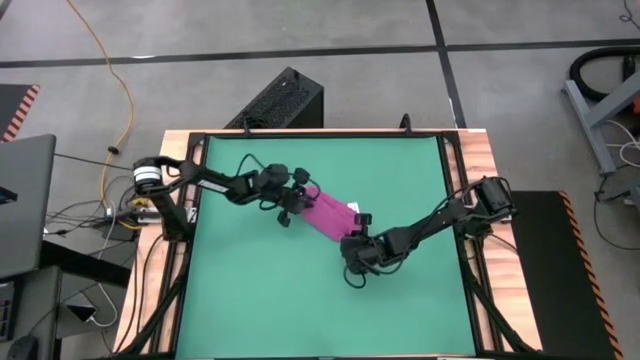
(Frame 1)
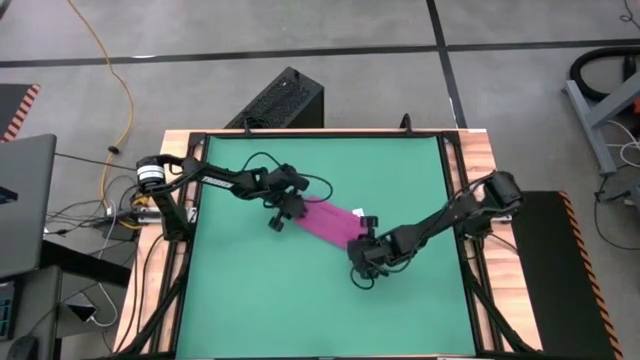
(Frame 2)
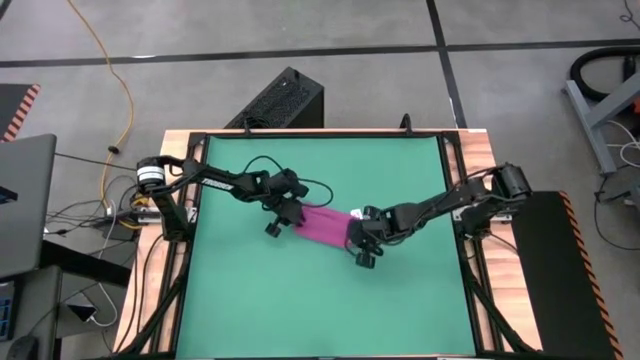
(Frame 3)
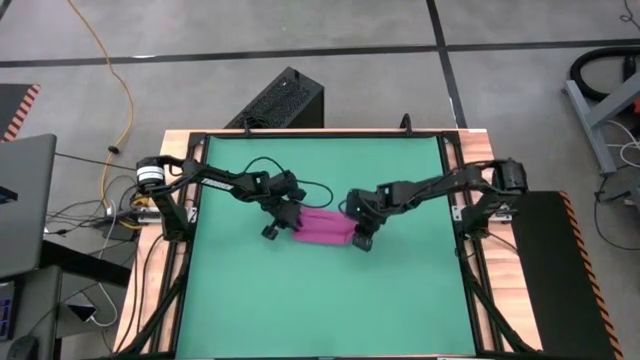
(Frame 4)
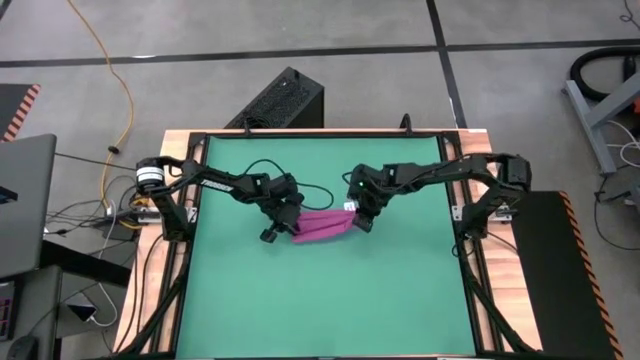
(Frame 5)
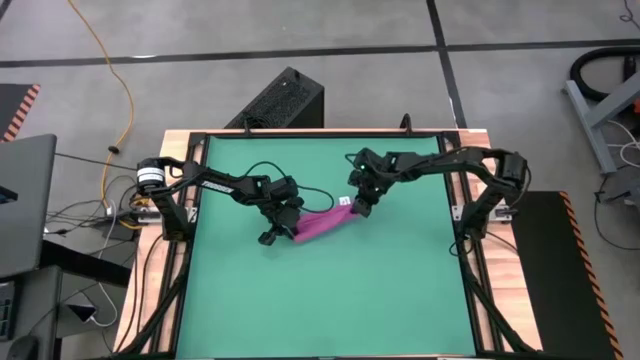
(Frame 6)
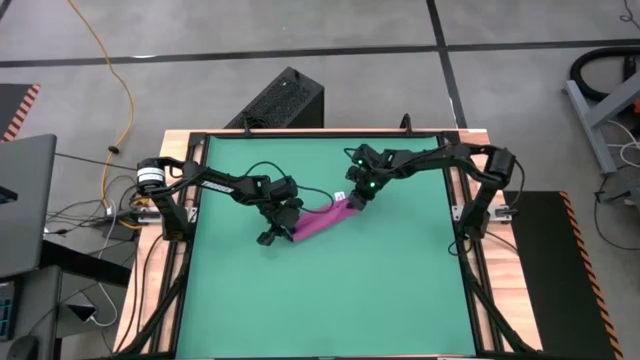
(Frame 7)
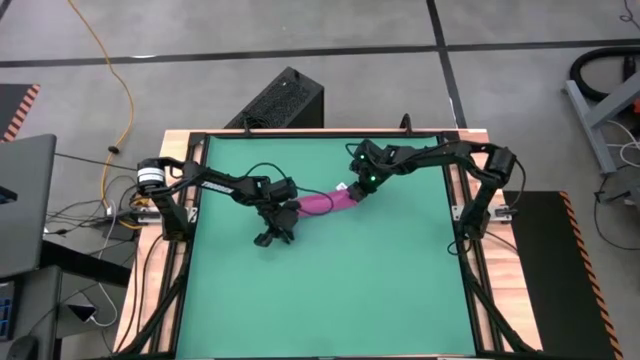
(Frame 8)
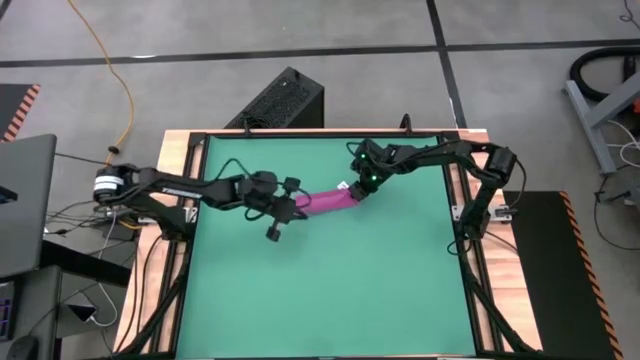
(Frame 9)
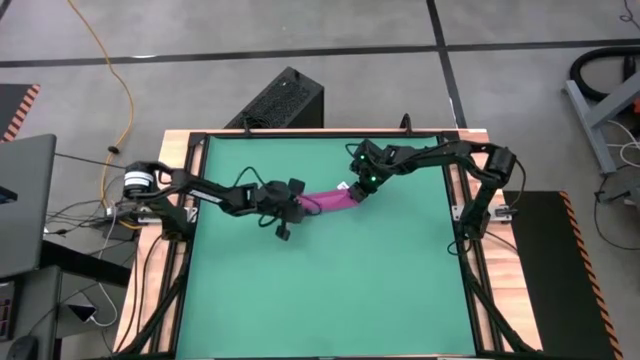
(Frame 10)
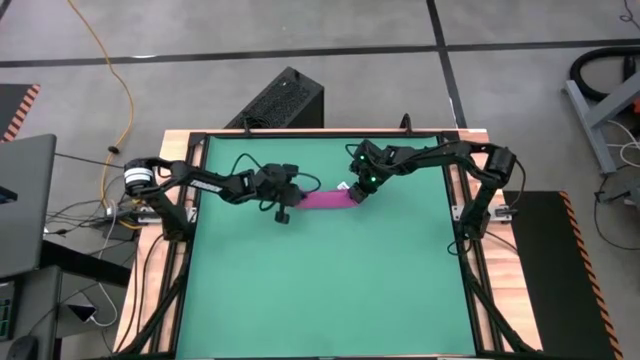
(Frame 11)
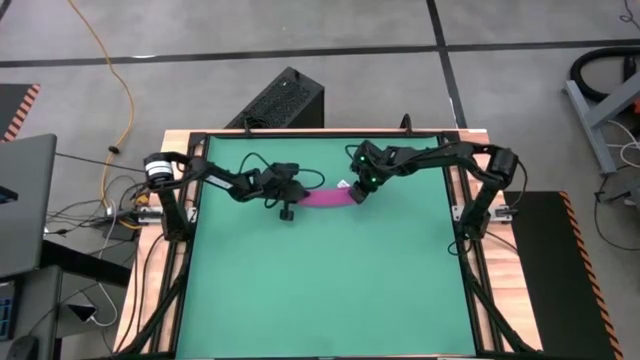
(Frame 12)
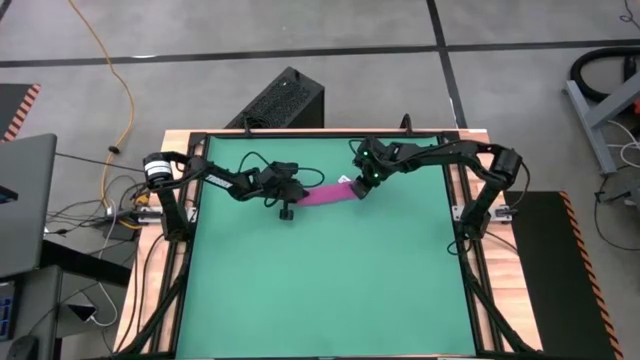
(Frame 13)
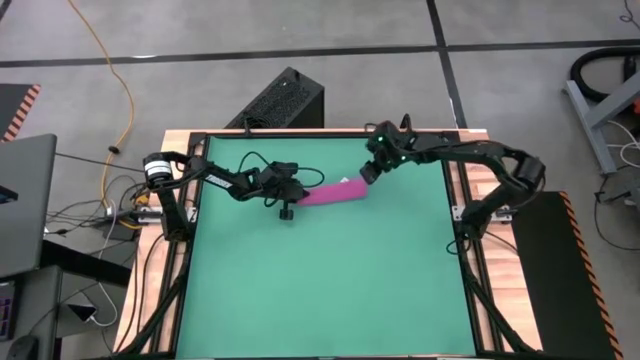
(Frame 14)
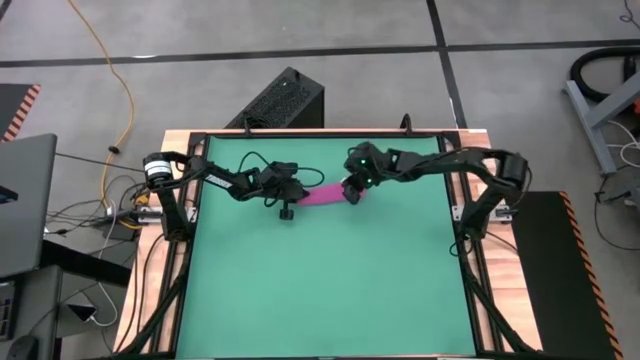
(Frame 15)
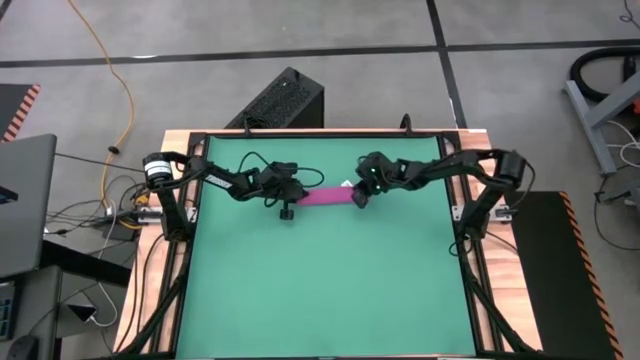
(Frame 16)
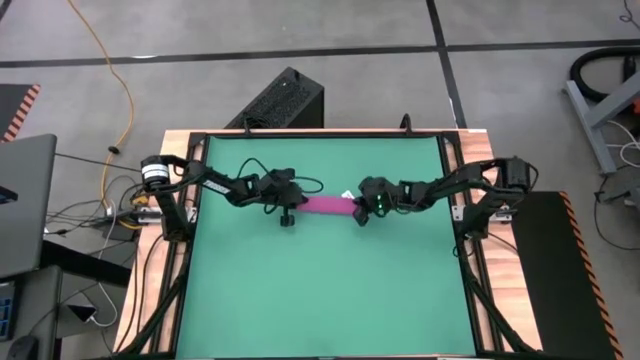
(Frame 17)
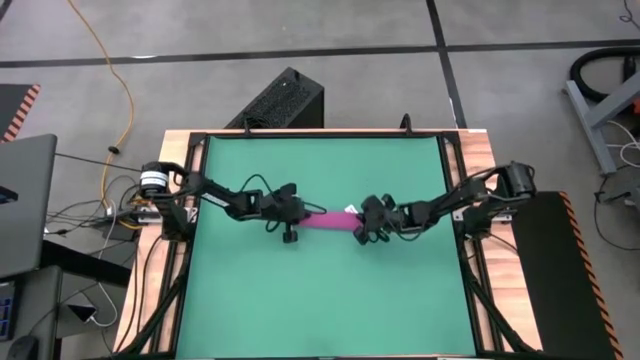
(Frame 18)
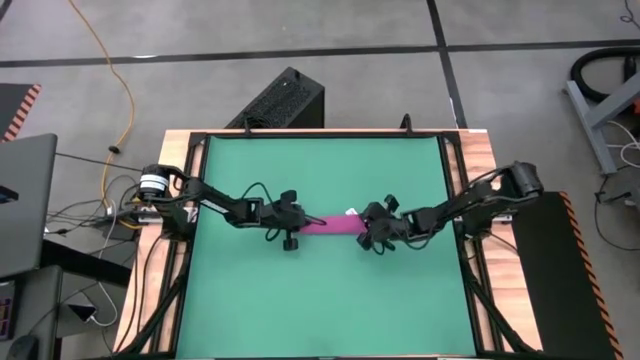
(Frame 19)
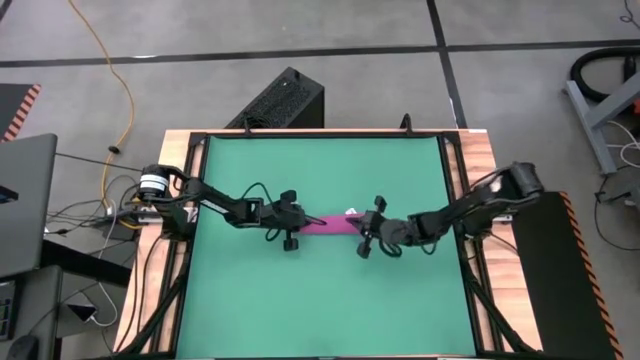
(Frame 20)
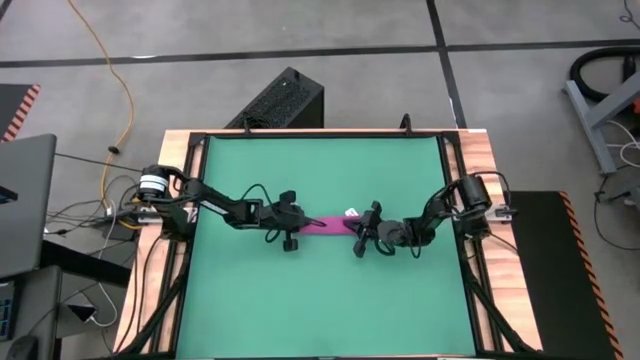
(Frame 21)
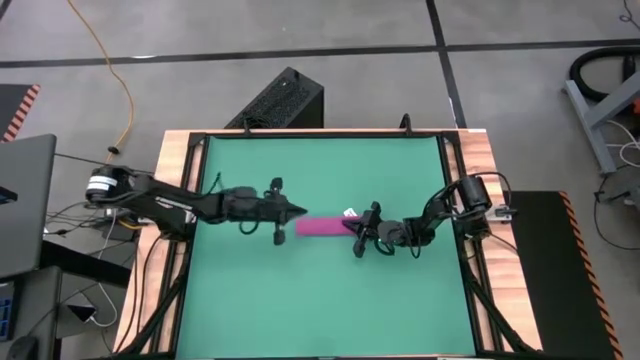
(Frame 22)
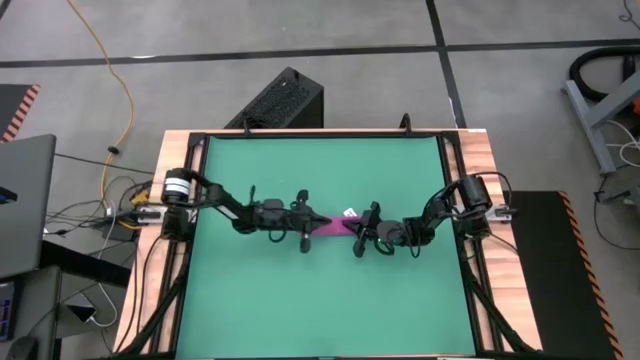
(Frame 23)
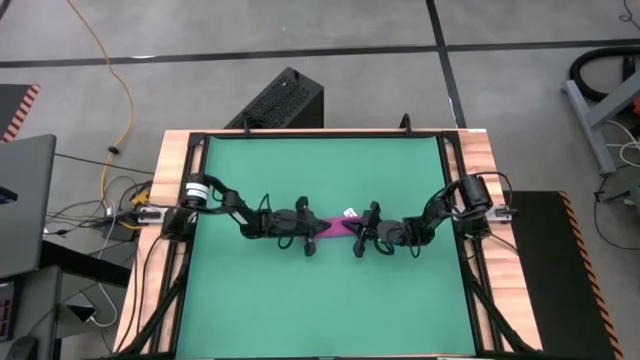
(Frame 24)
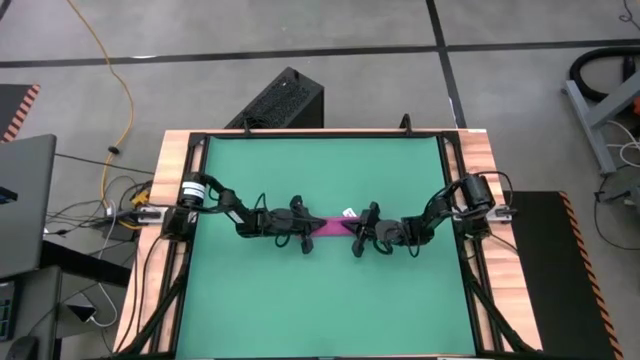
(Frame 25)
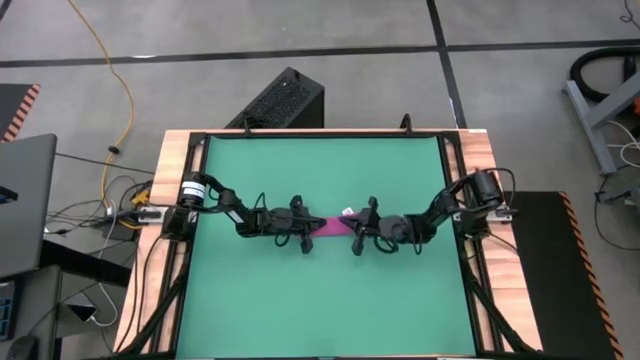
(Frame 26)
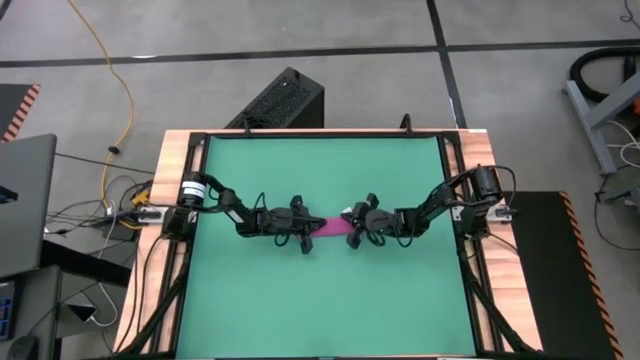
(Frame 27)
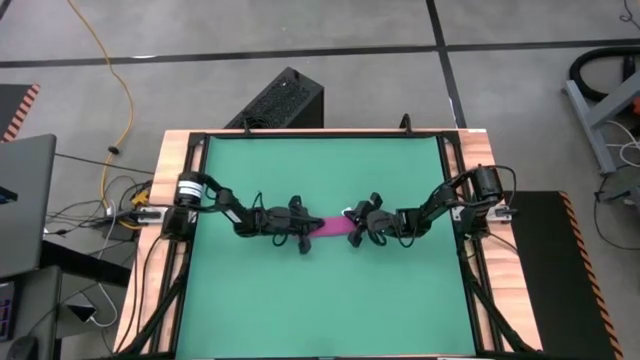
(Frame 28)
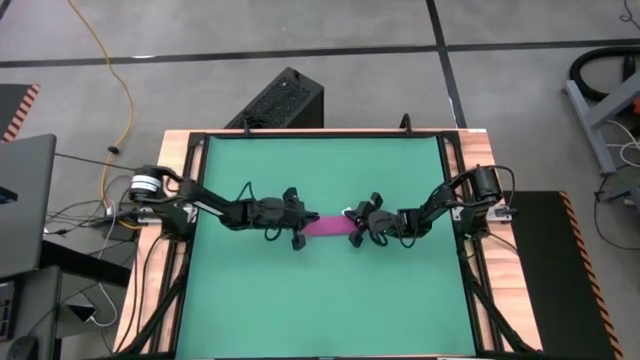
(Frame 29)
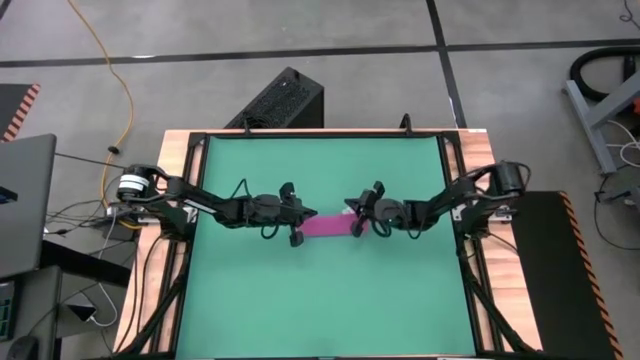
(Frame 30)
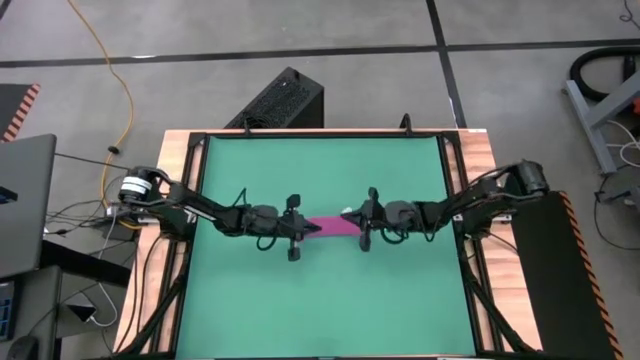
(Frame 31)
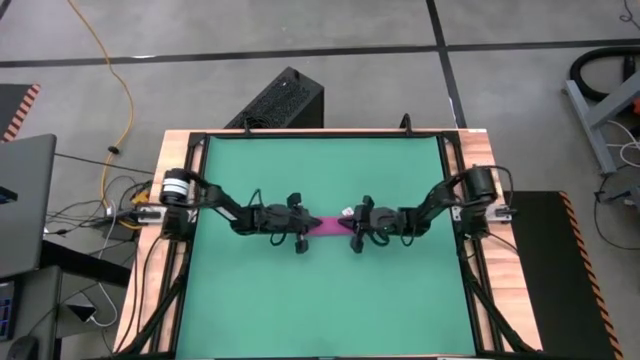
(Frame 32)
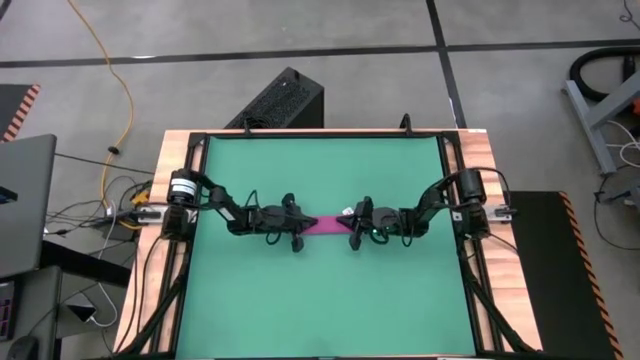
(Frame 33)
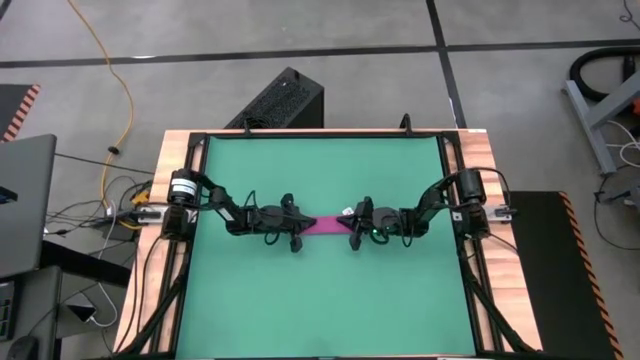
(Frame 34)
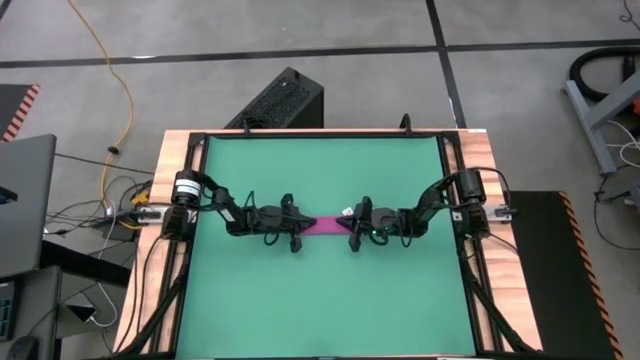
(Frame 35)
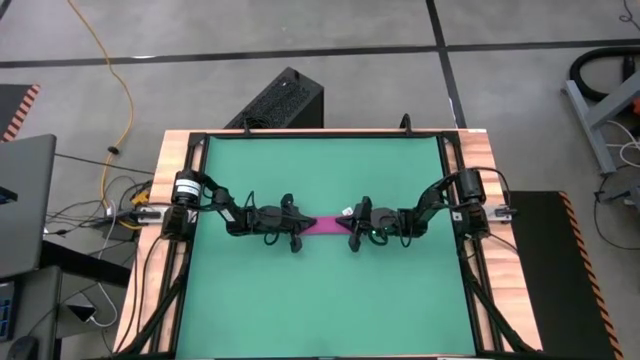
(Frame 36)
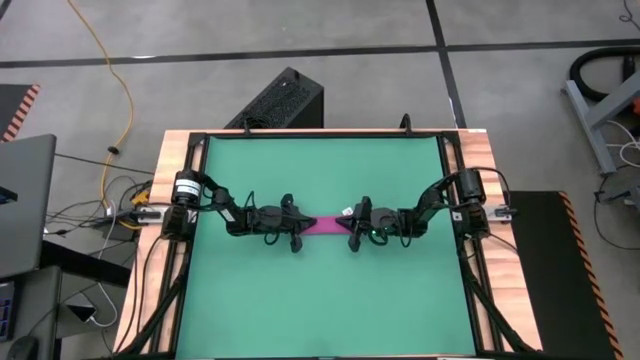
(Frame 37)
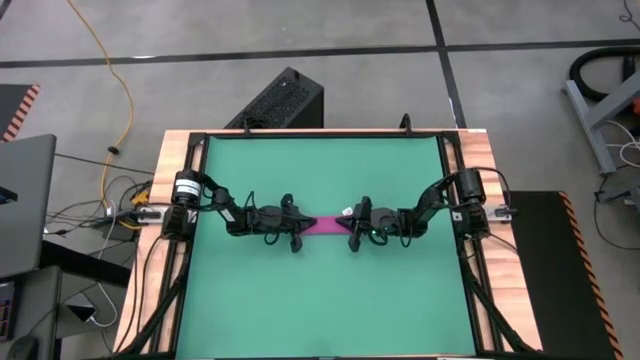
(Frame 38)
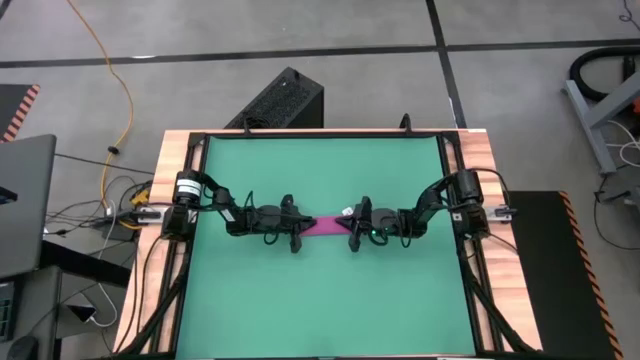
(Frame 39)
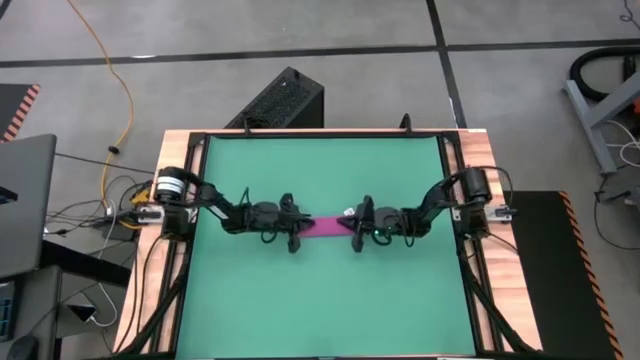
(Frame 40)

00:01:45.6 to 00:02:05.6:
Task: Roll towel into tight, uniform cylinder
Roll the pink towel
